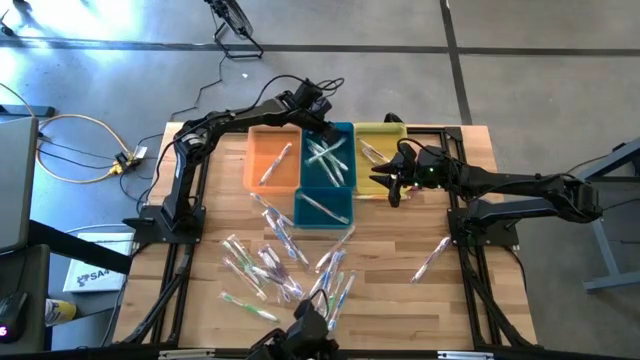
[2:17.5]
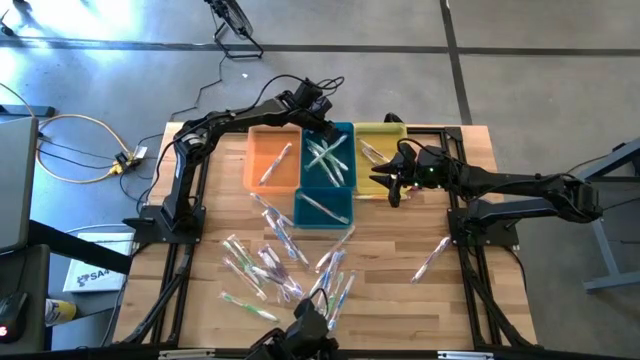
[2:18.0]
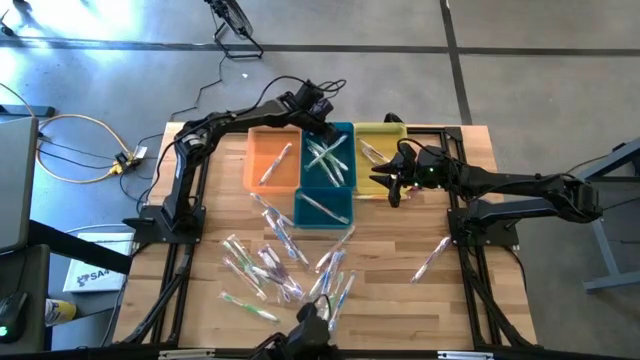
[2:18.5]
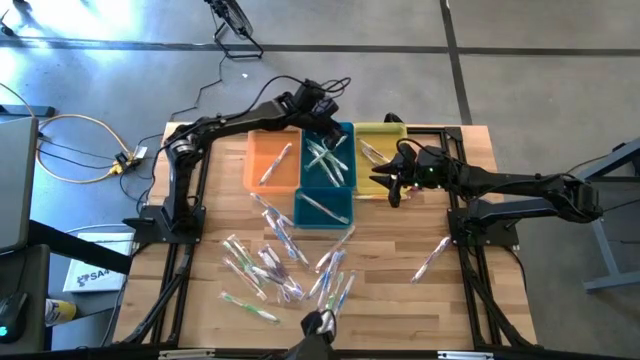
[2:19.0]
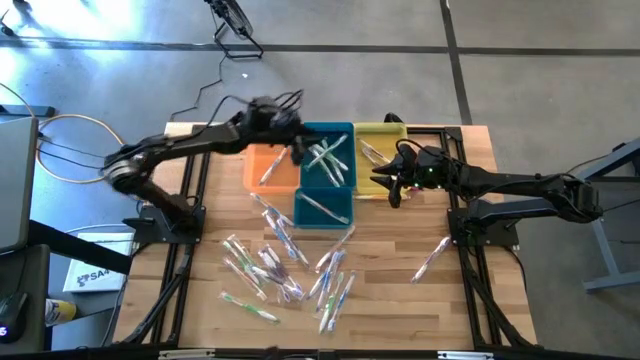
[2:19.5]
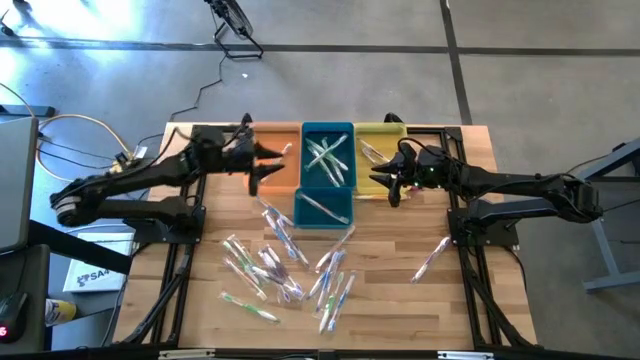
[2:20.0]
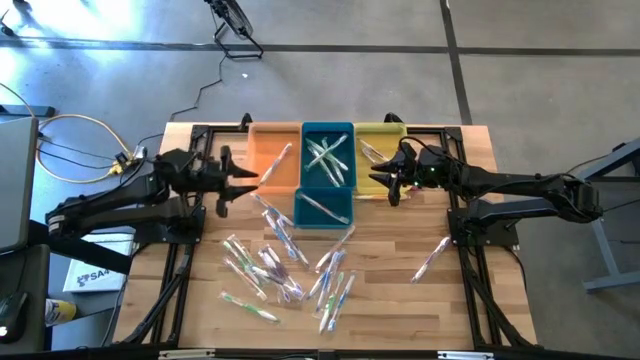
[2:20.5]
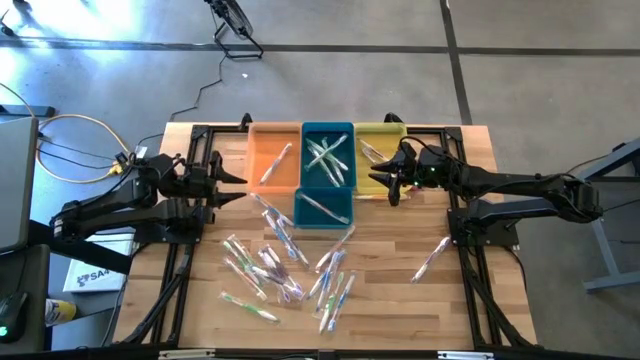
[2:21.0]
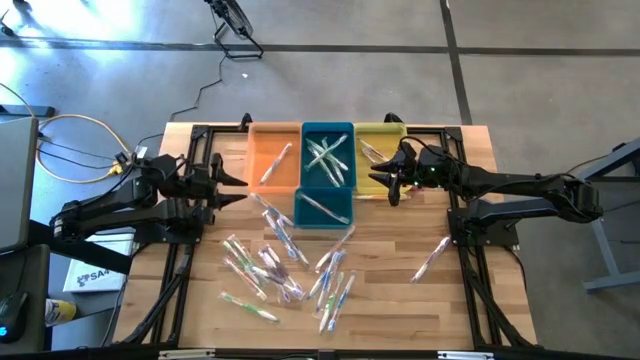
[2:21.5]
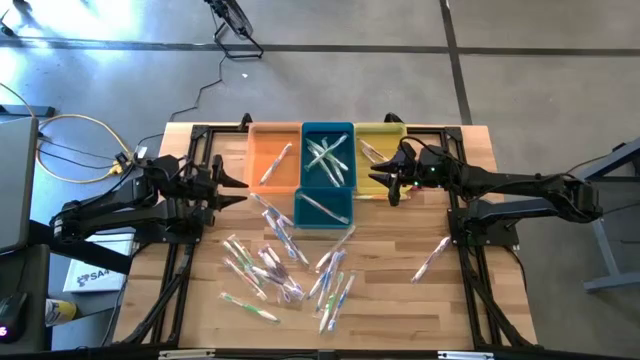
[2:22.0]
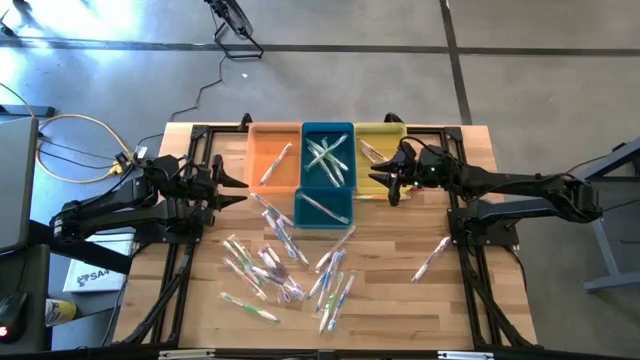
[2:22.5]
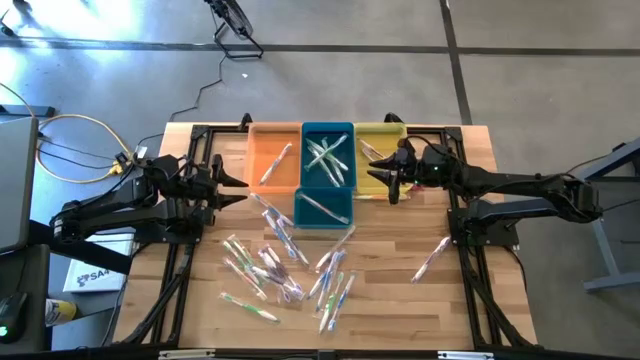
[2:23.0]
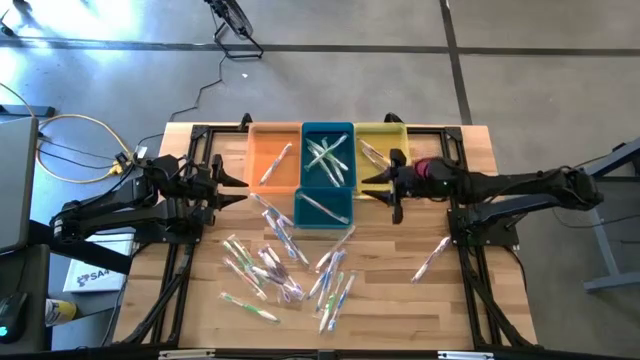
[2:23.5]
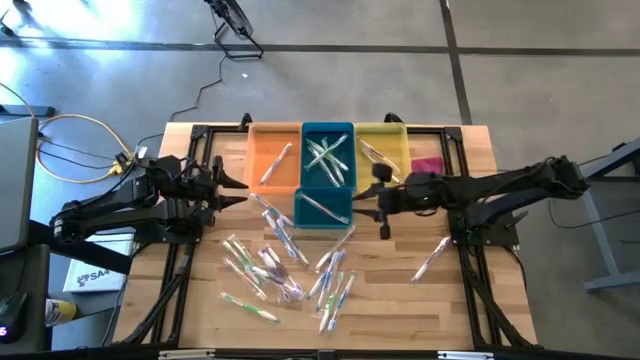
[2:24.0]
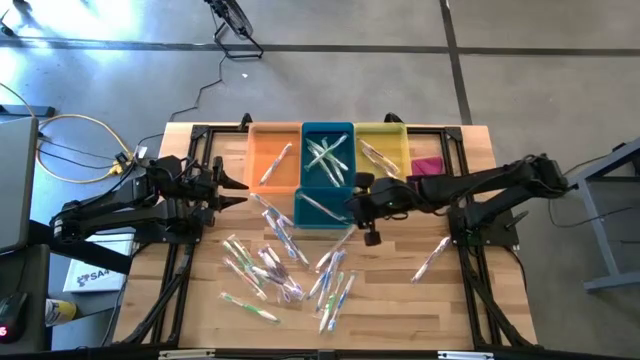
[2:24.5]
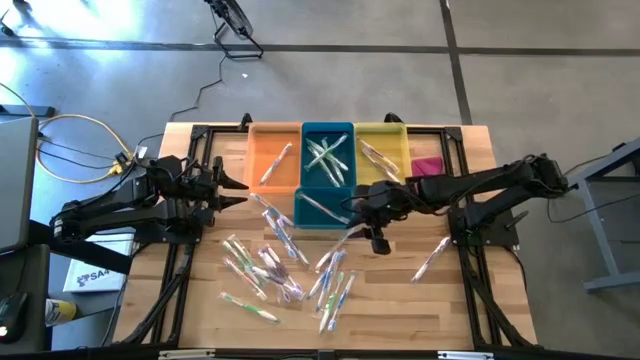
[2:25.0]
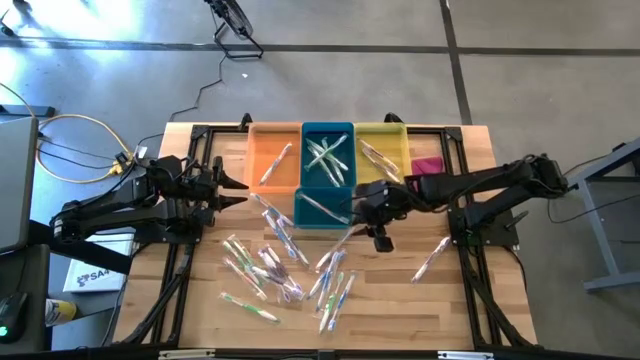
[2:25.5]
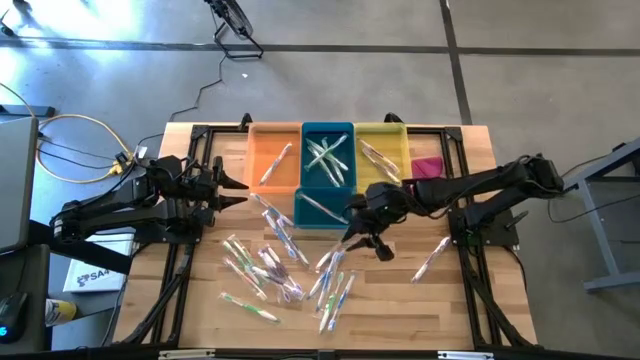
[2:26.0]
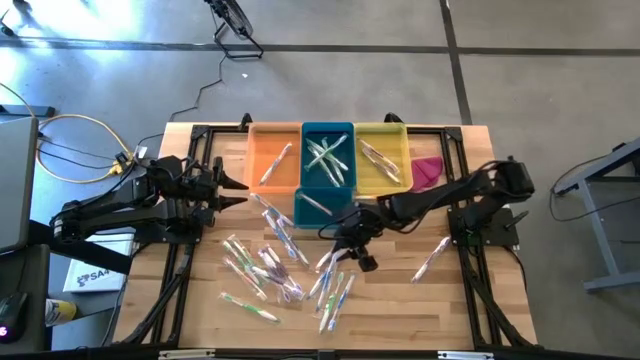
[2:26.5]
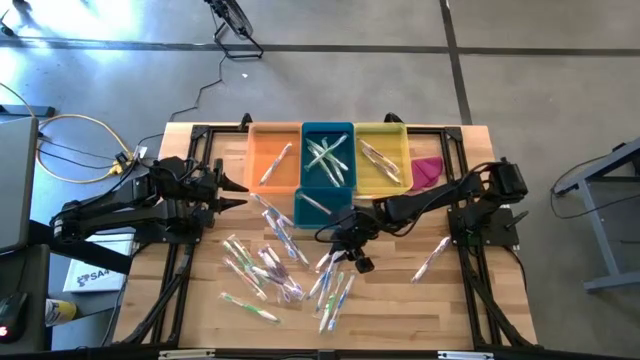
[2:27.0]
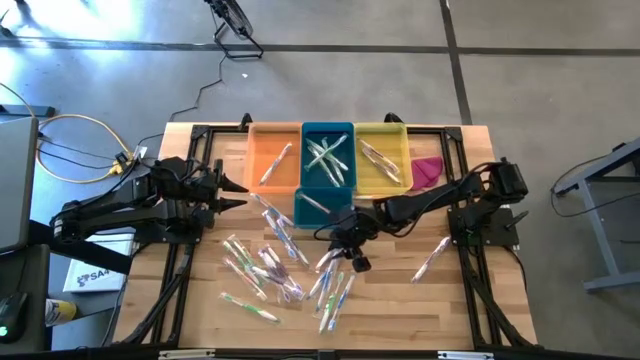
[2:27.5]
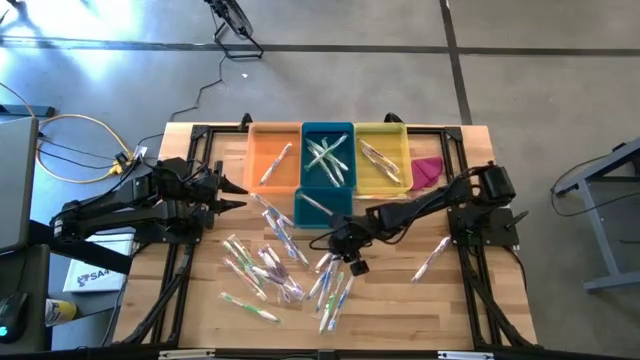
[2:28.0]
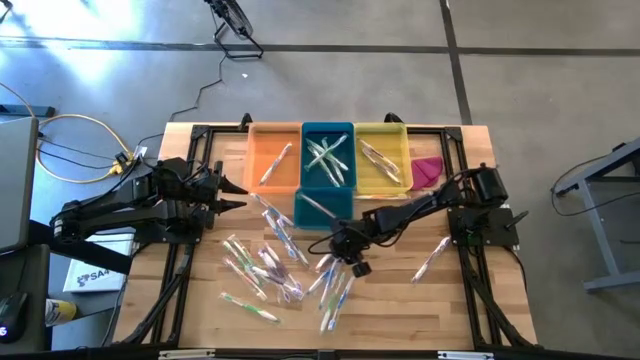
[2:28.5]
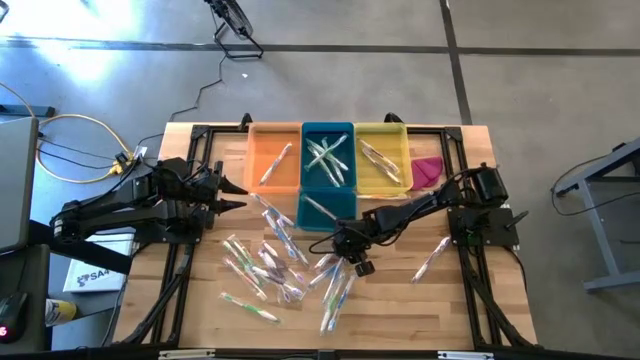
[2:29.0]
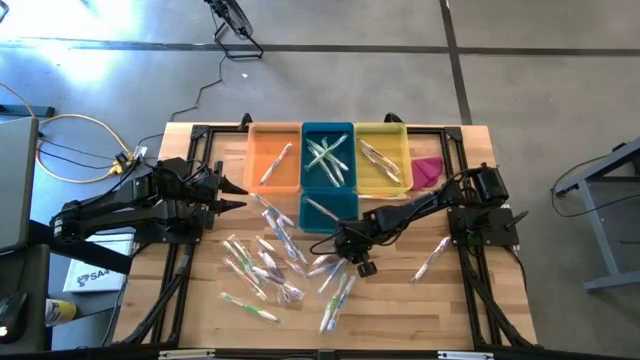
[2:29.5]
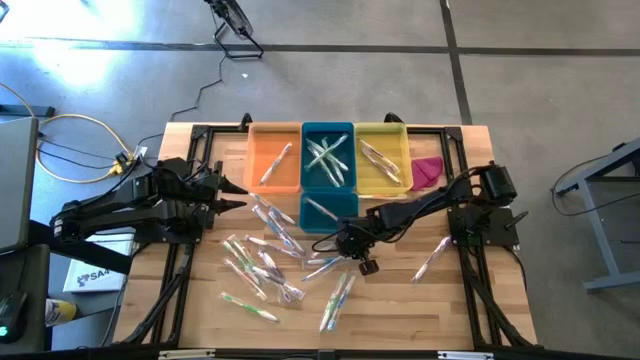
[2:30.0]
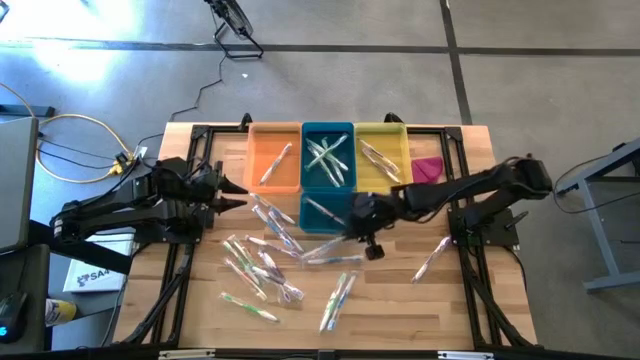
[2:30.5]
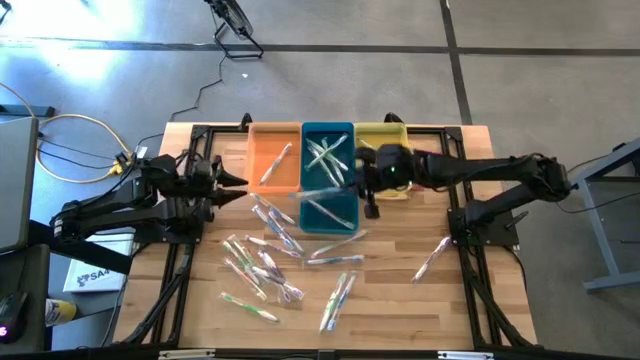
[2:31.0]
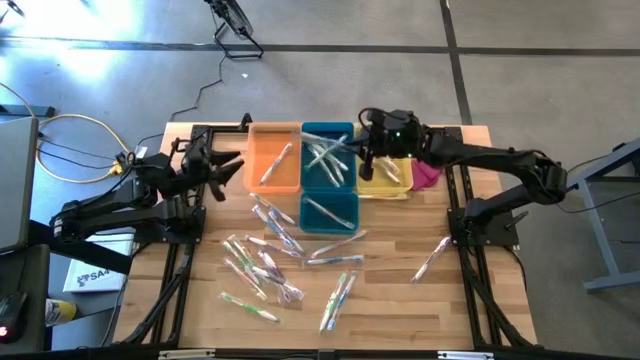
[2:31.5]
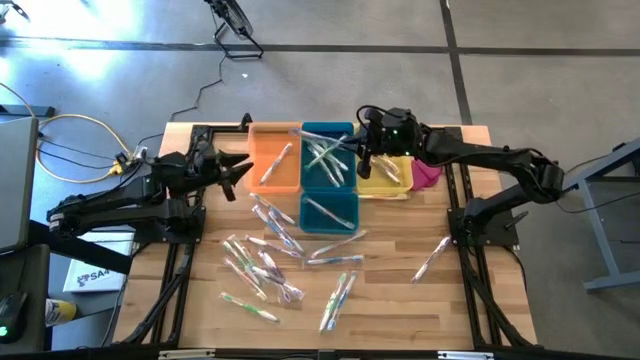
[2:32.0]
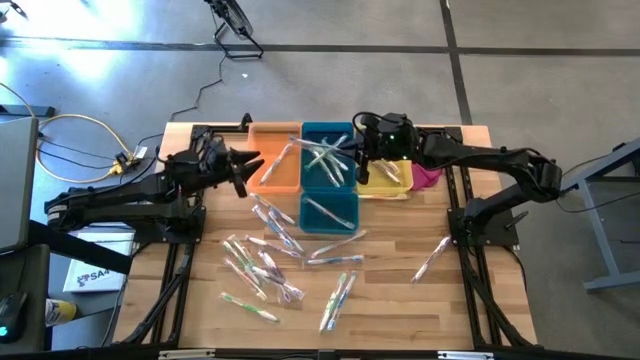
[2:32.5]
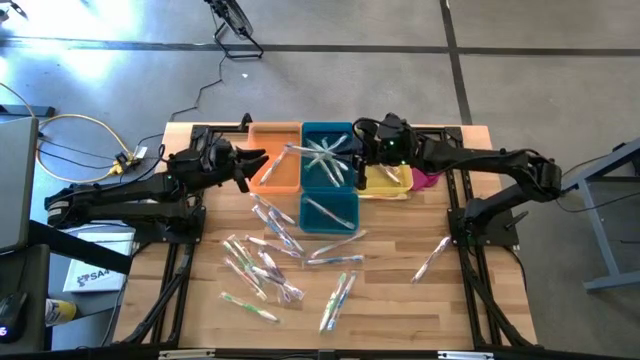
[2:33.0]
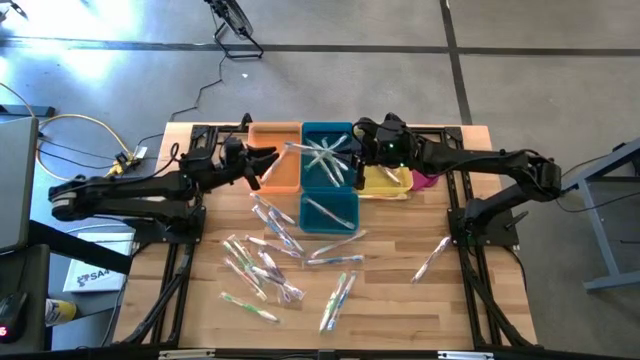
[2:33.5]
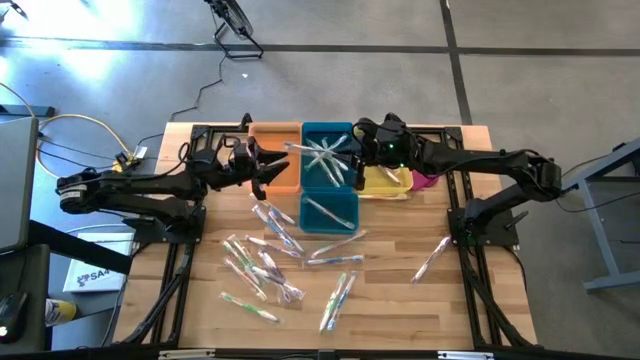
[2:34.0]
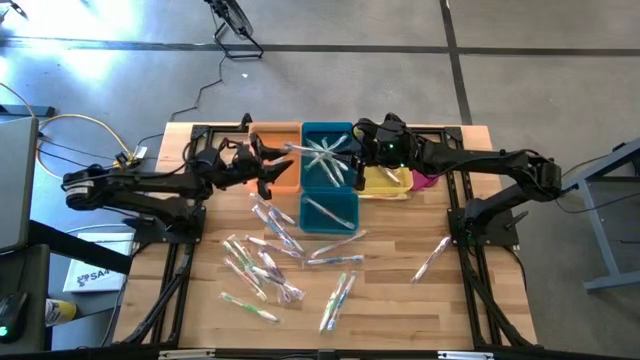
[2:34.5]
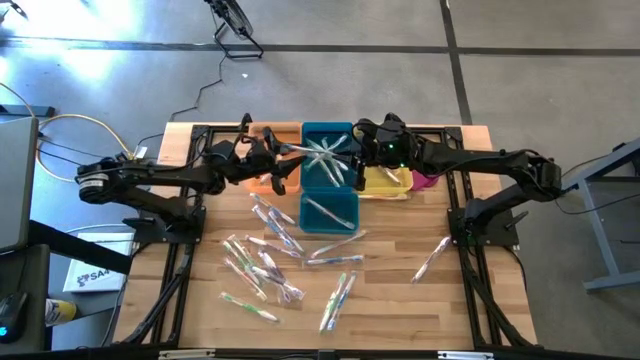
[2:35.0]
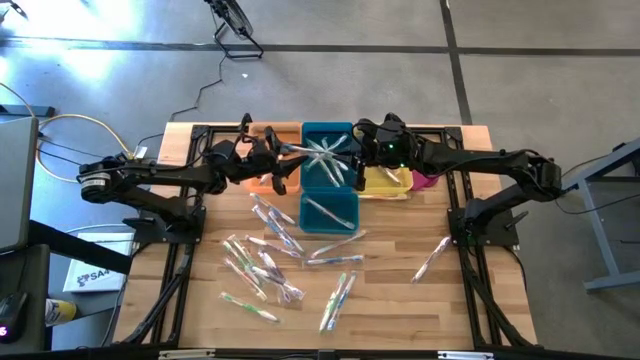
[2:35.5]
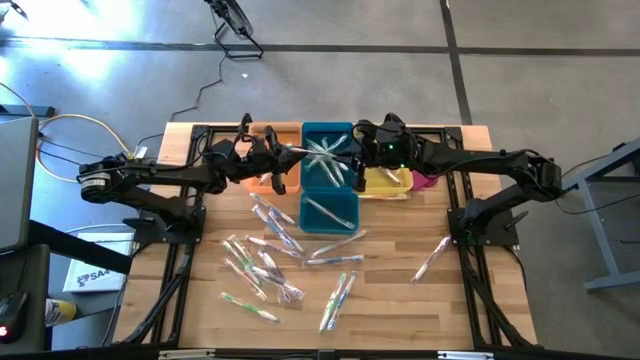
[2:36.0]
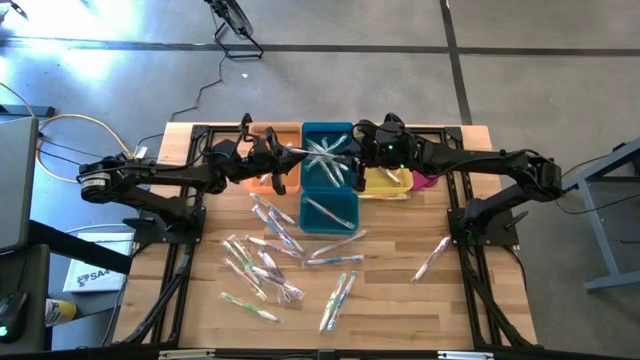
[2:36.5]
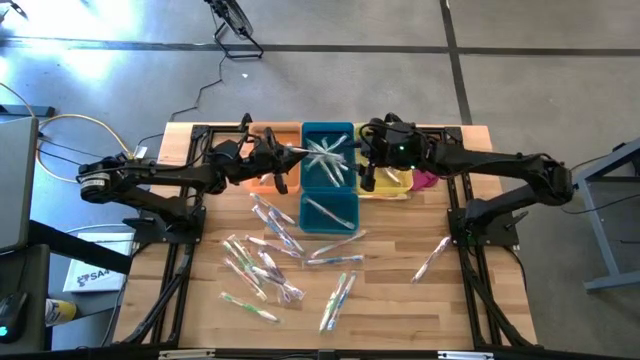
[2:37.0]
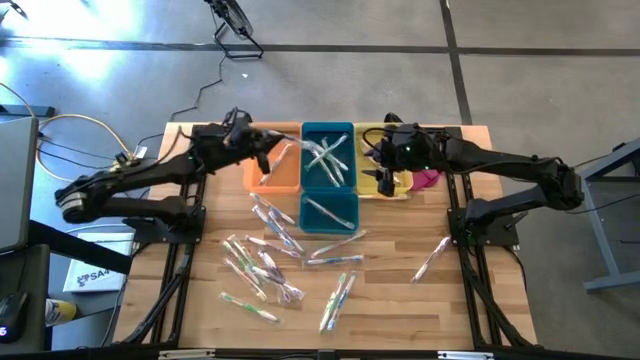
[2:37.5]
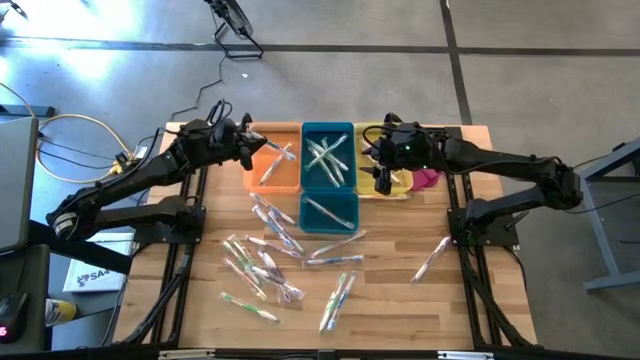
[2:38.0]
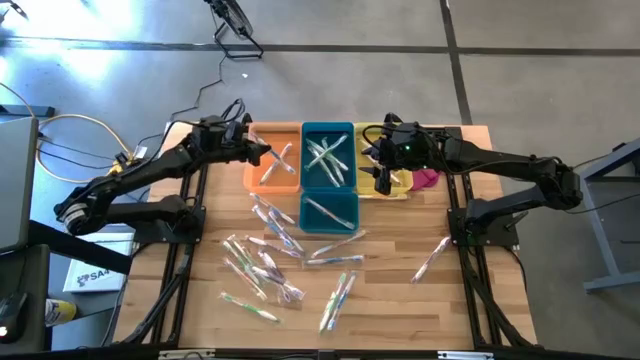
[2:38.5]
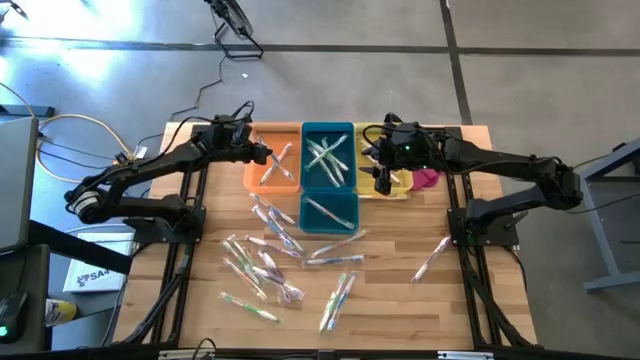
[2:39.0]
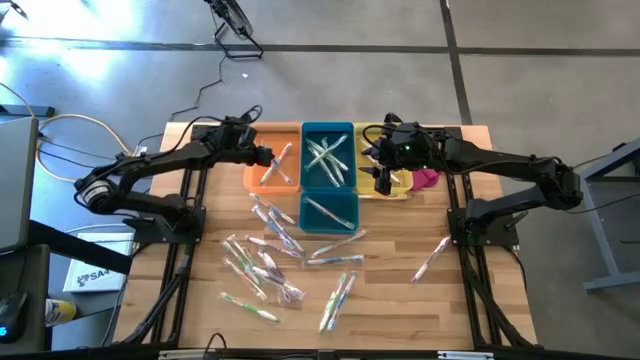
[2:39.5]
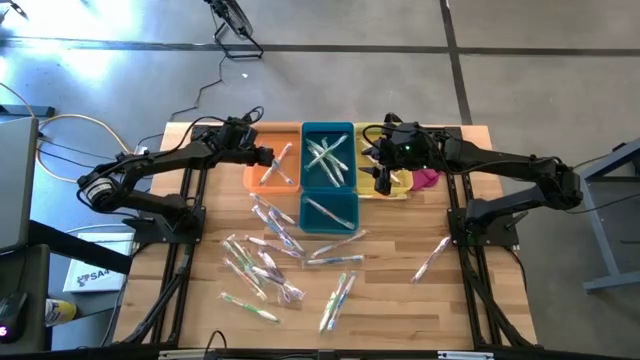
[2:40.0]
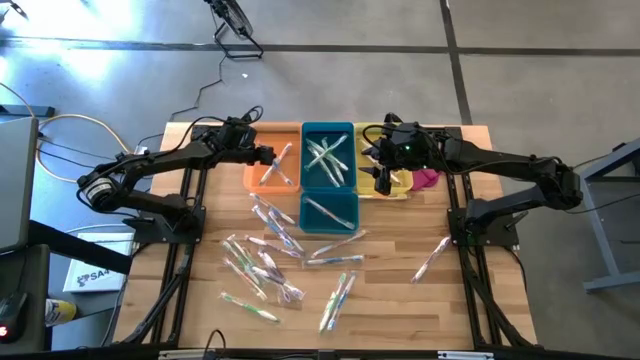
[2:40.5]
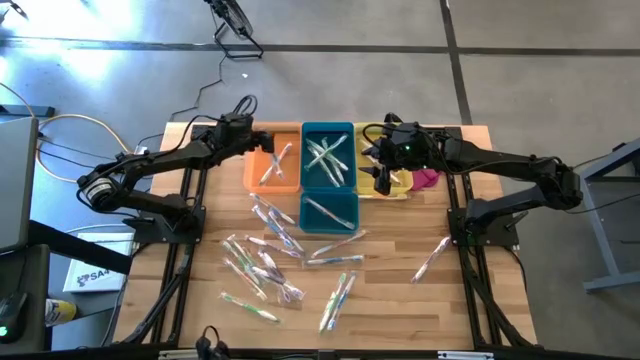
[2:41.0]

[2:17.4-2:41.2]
Task: Pick & Place Toothbrushes
Put the blue toothbrush into the orange bin
